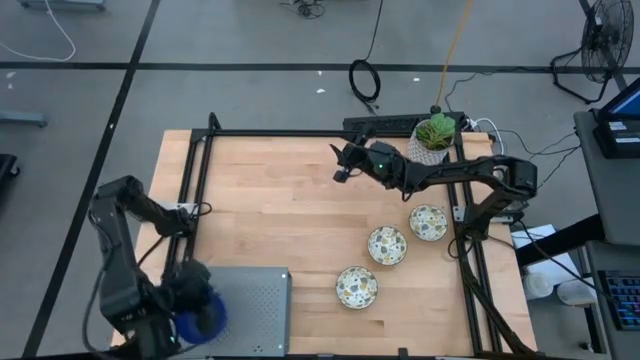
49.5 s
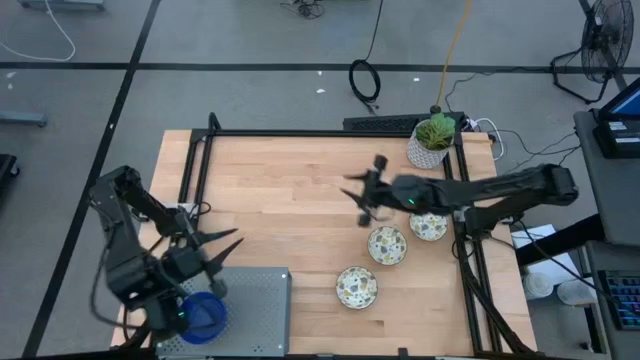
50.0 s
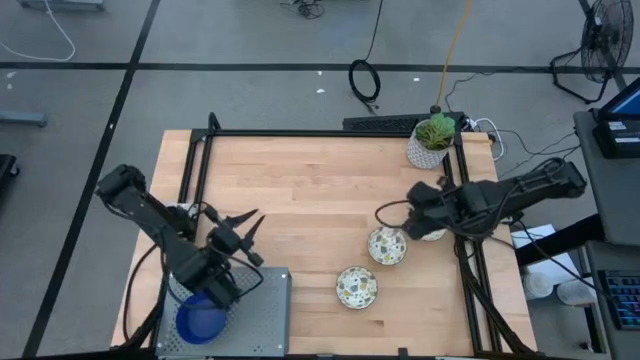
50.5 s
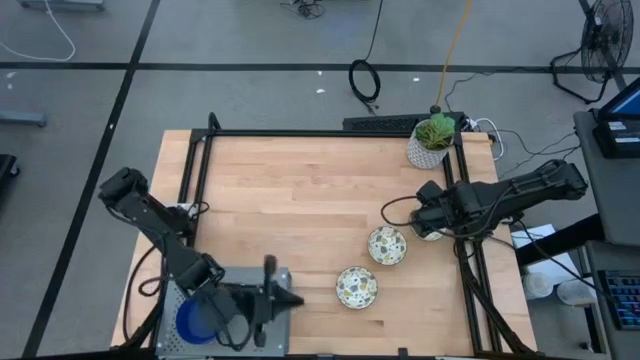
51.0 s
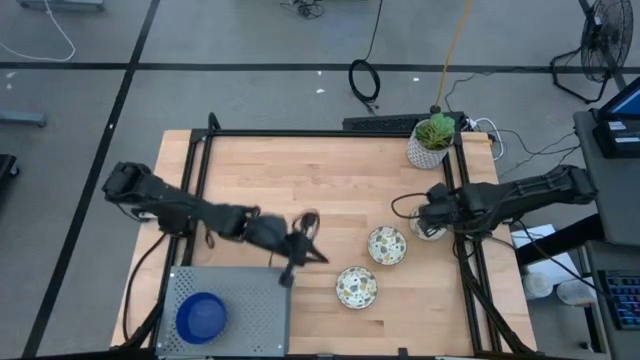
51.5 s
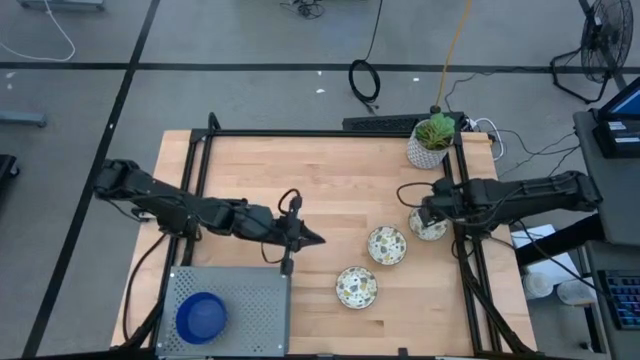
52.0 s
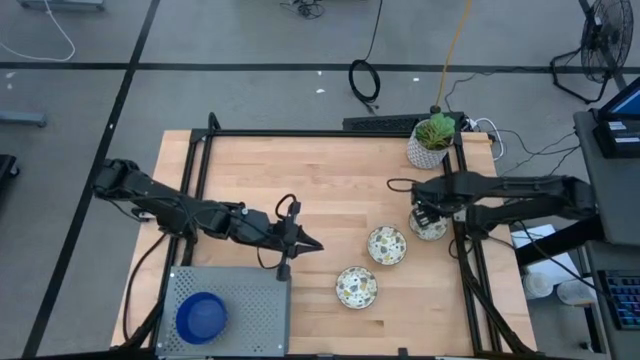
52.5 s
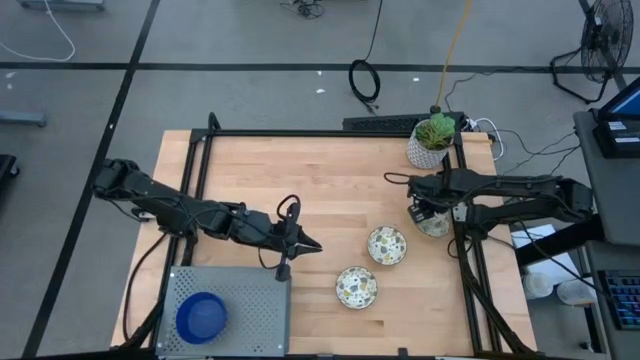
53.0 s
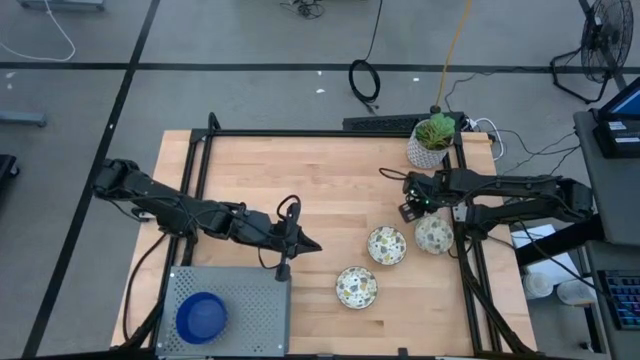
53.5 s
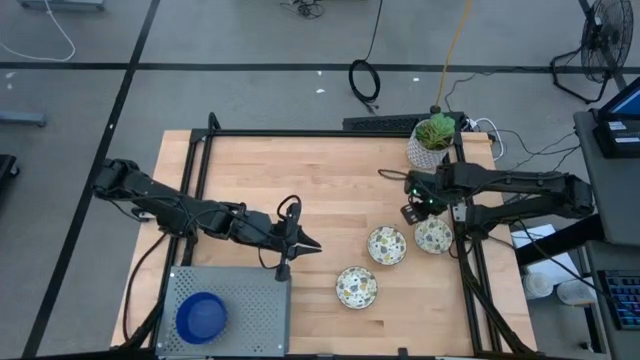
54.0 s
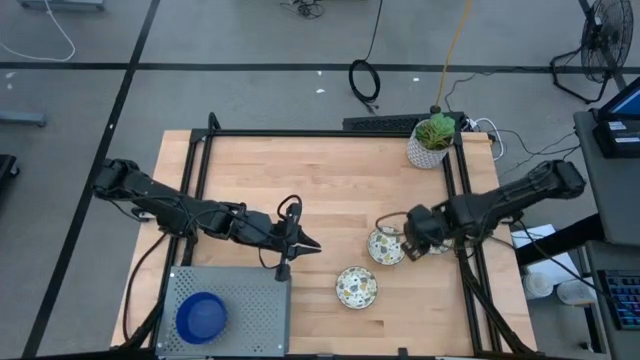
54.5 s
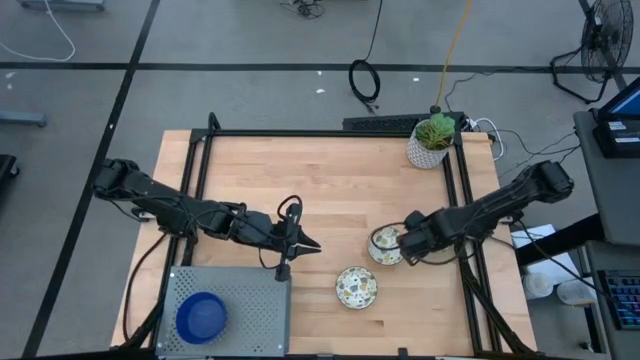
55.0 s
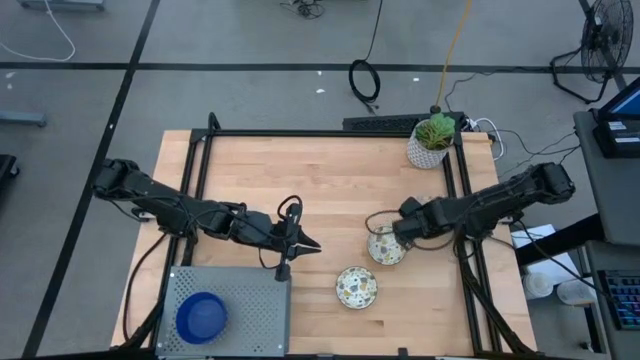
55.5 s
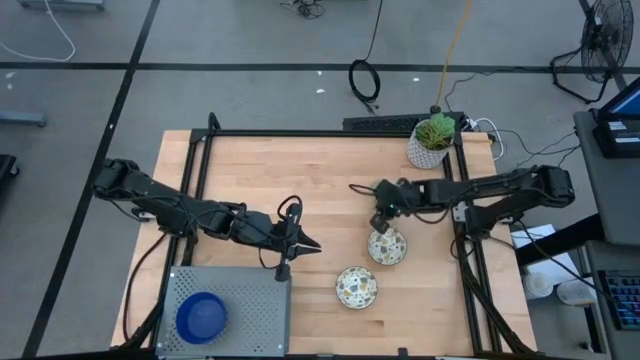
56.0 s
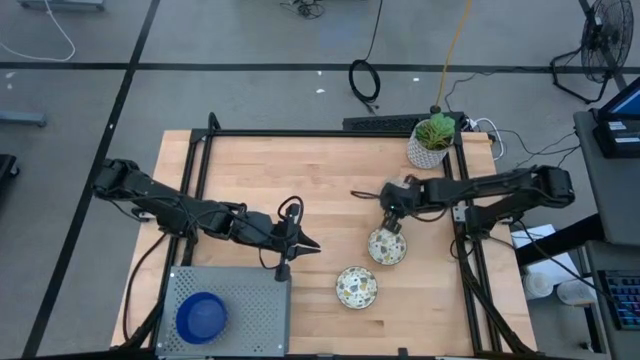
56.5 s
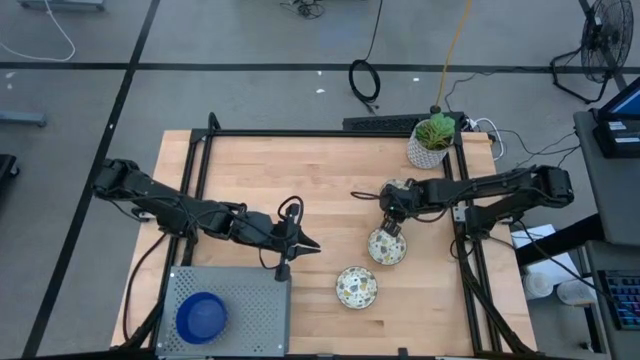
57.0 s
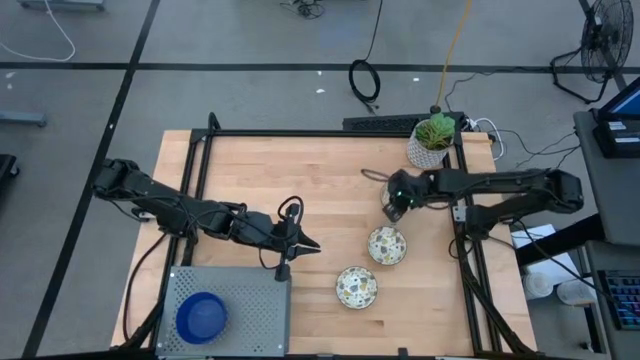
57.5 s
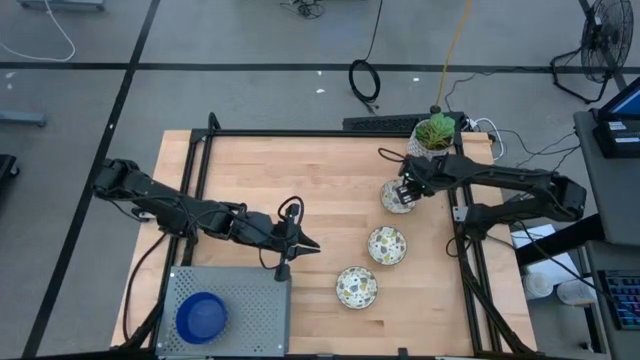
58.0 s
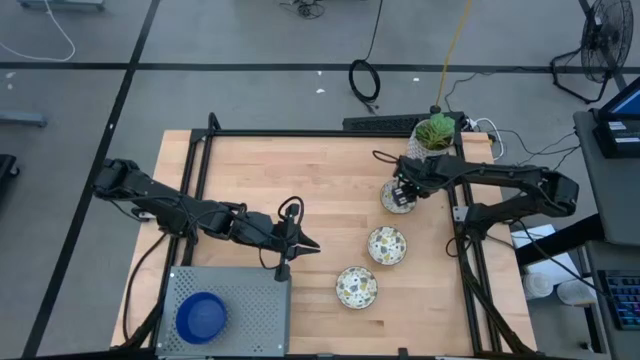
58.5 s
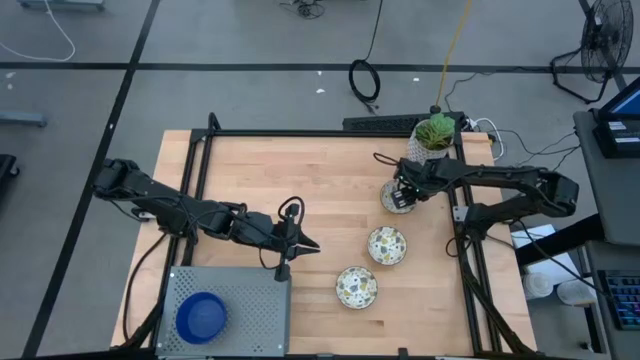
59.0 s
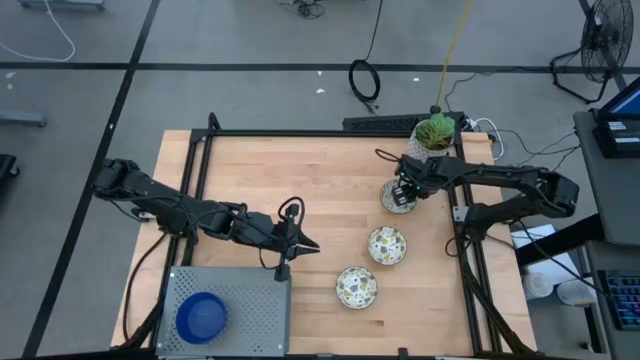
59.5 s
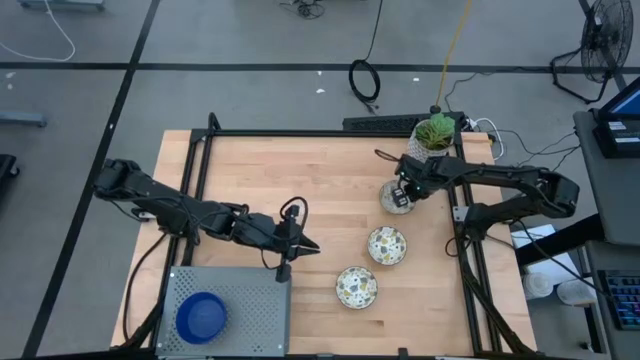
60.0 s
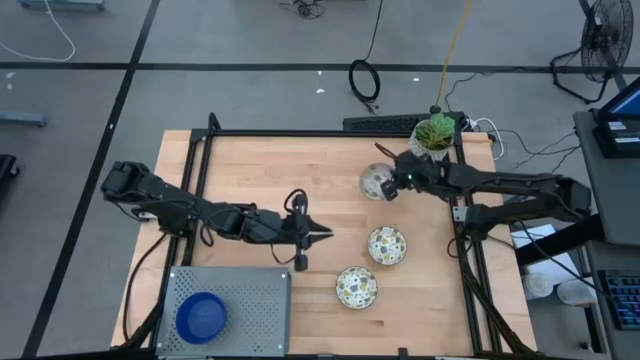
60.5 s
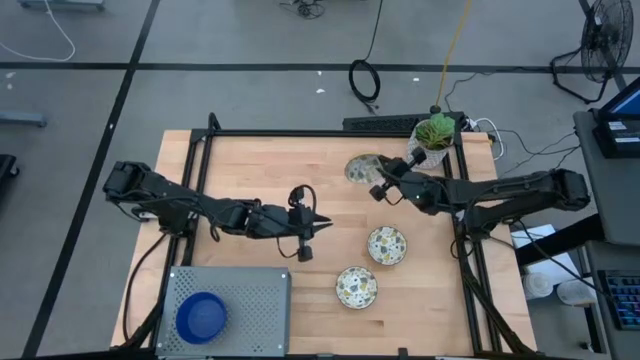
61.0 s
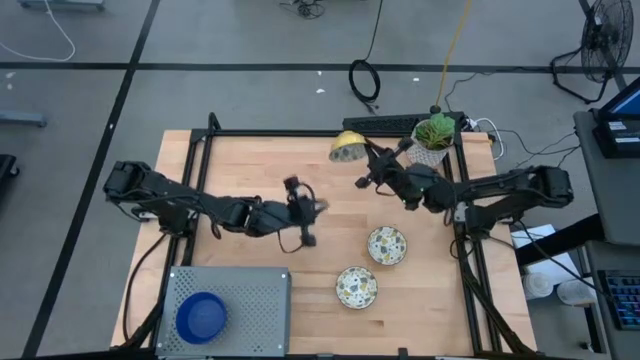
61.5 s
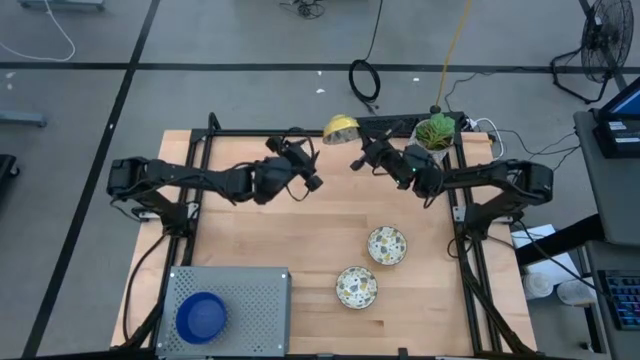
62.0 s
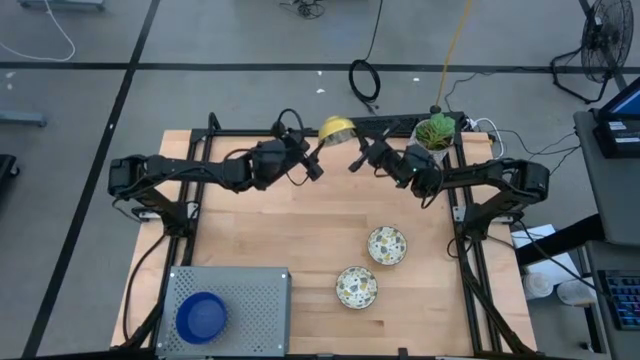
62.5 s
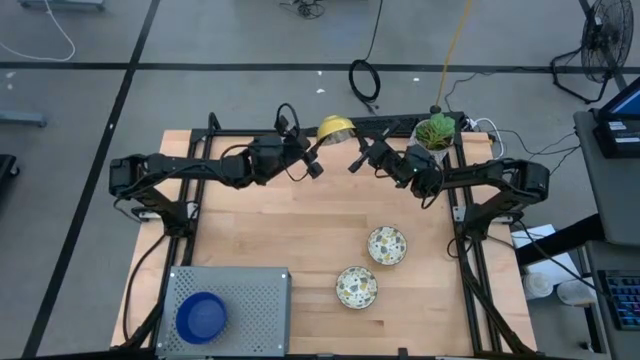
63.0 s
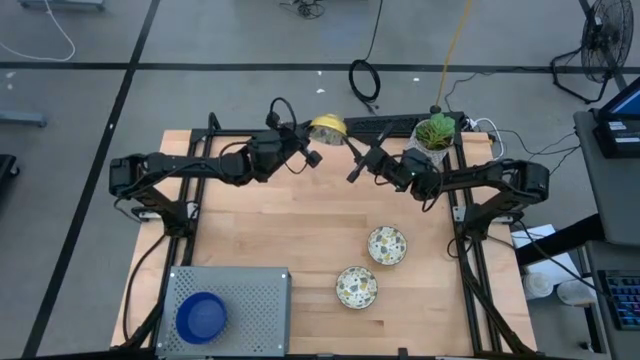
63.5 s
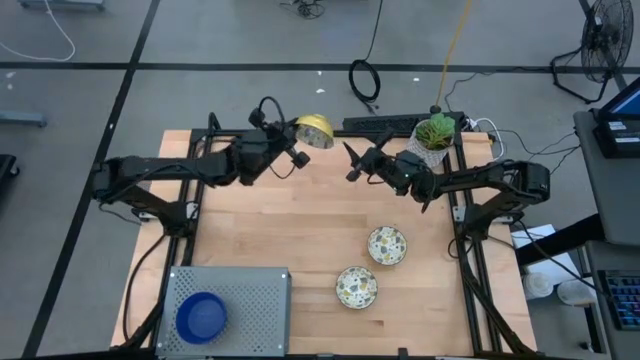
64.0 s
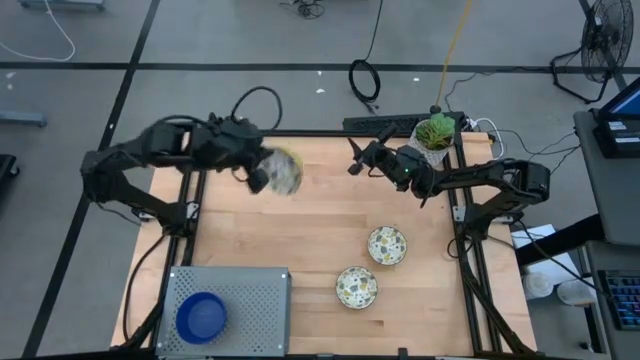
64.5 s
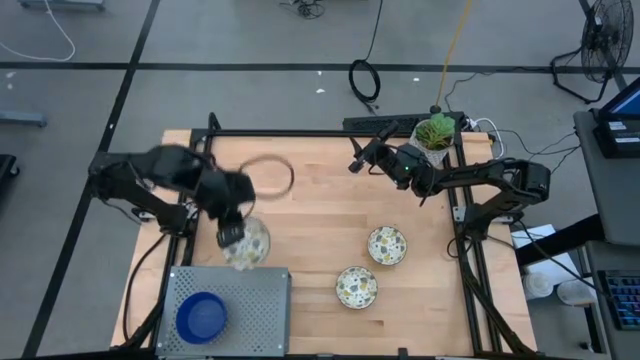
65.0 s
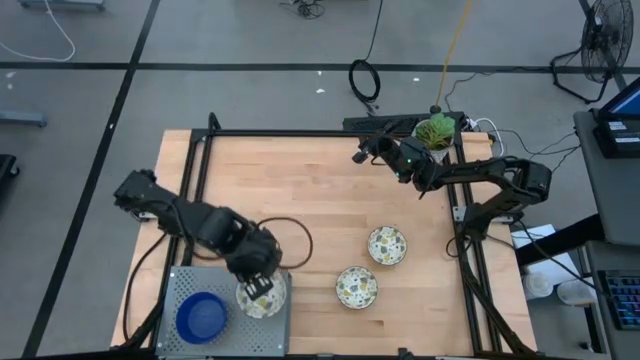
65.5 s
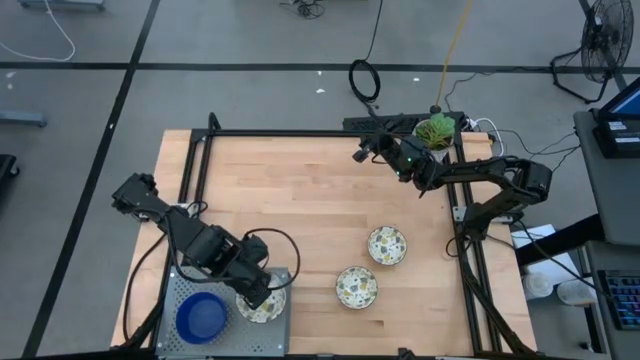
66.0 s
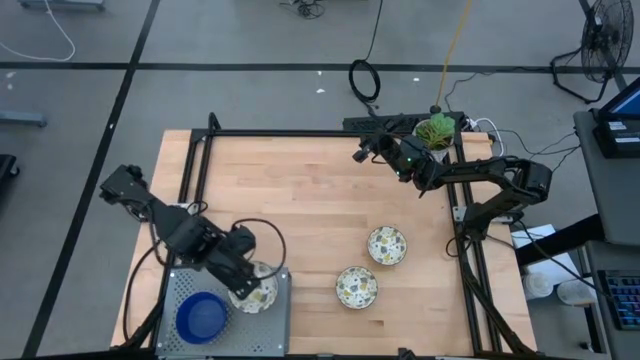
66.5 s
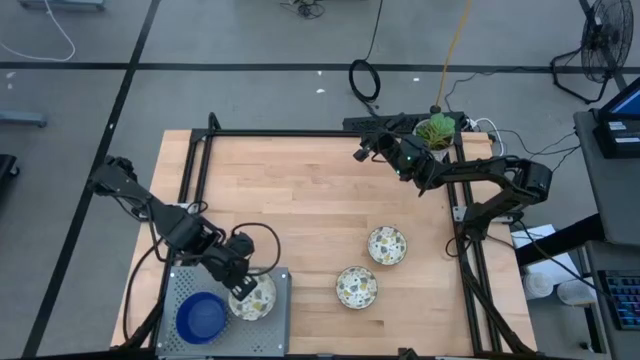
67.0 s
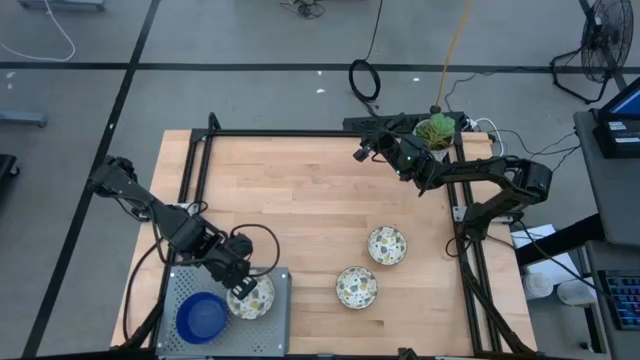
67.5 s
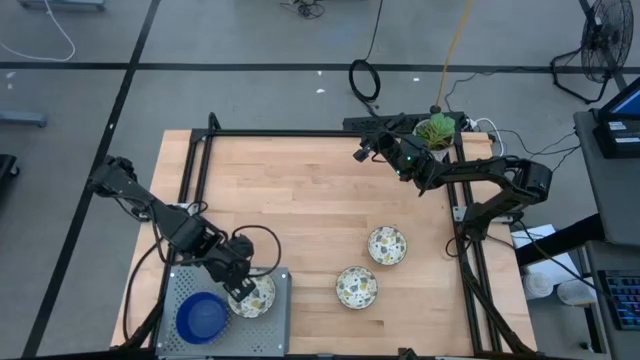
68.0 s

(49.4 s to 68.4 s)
Task: Pick & Place Mini bowls
Put the top white patterned bowl on the shelf

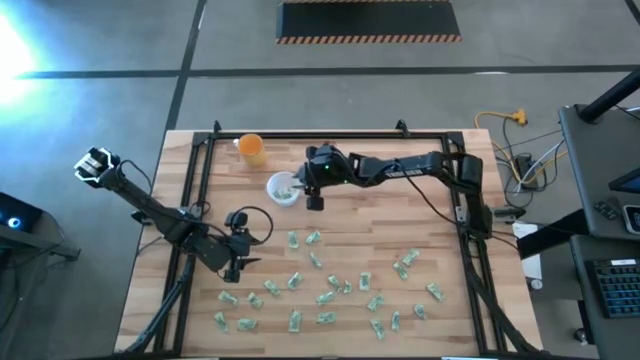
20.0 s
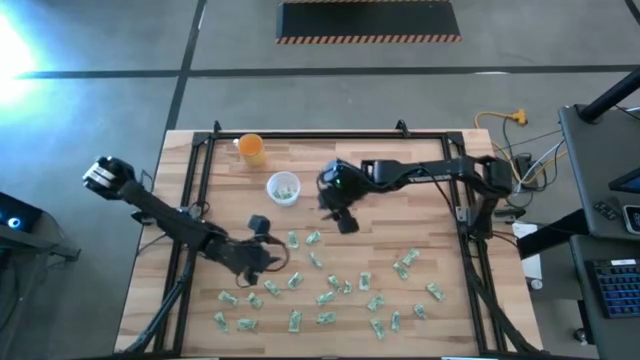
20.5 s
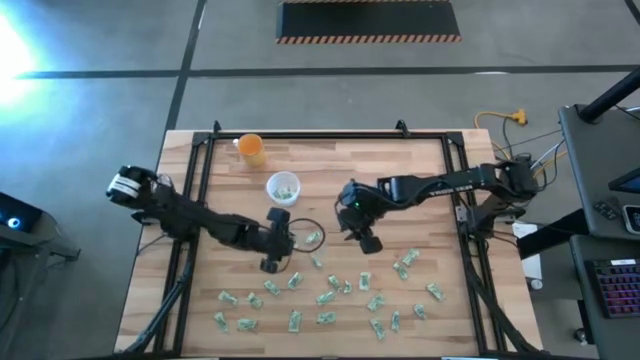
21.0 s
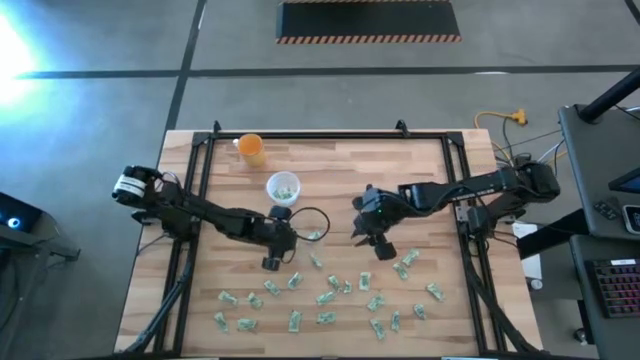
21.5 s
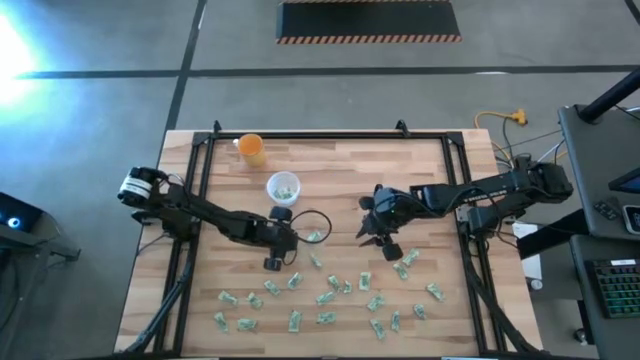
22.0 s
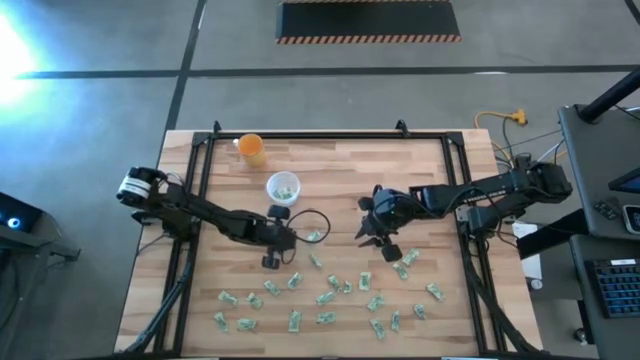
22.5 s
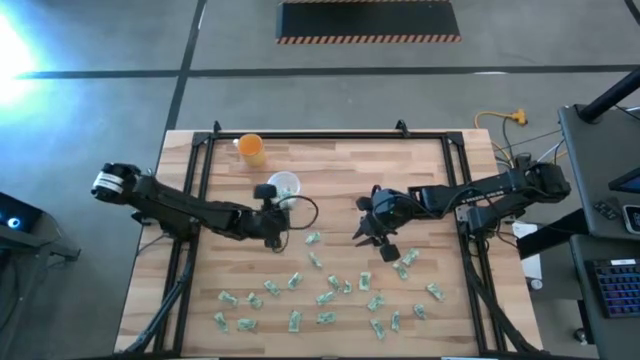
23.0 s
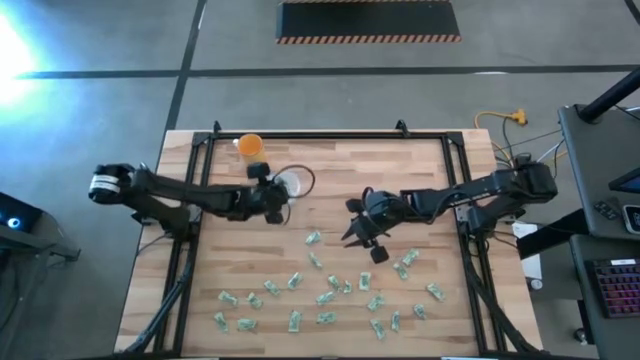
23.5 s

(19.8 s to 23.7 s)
Task: Pick and place Stevia / Truvia into bins
Put the stevia packet into the transparent container
